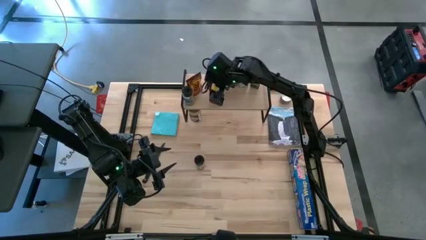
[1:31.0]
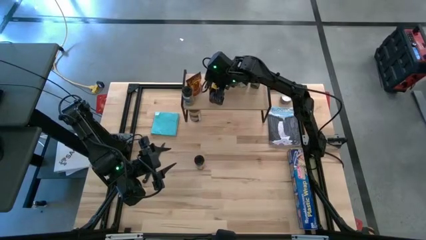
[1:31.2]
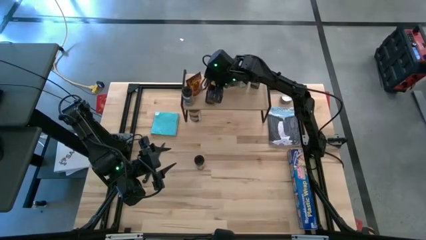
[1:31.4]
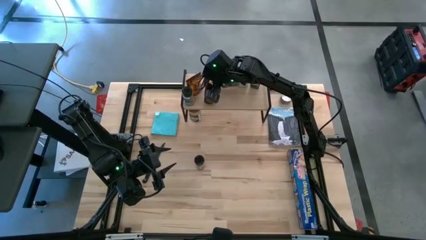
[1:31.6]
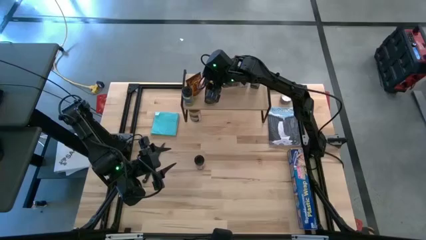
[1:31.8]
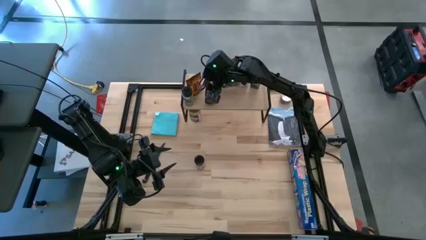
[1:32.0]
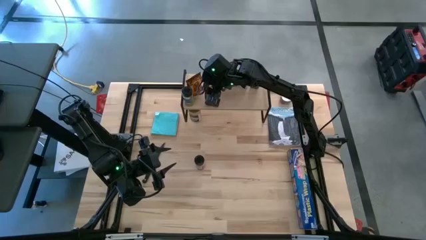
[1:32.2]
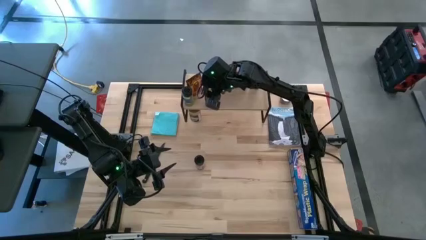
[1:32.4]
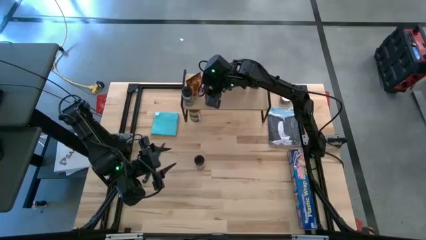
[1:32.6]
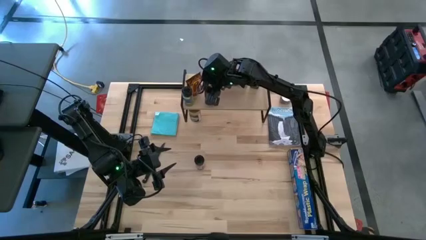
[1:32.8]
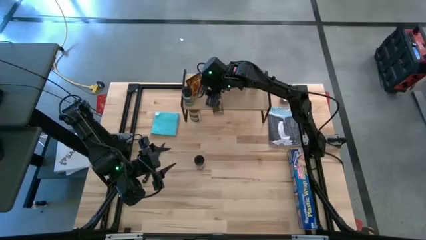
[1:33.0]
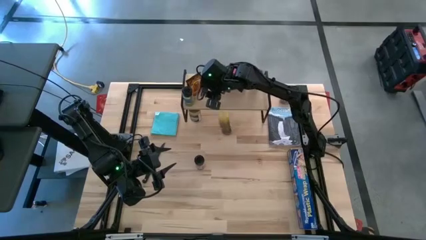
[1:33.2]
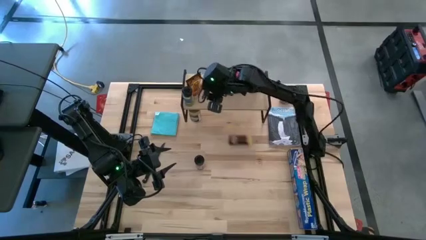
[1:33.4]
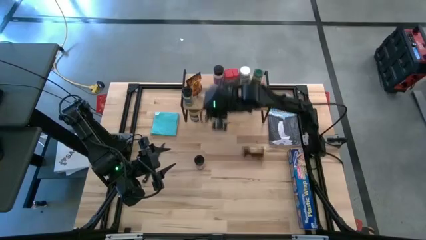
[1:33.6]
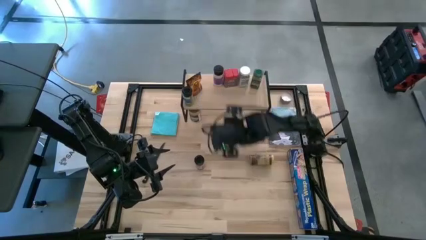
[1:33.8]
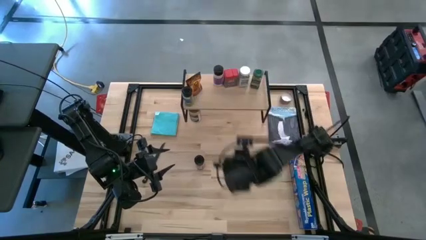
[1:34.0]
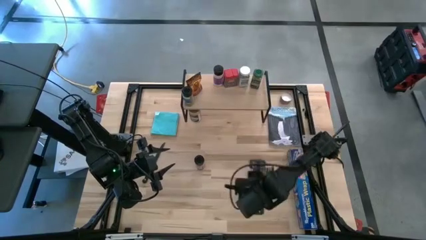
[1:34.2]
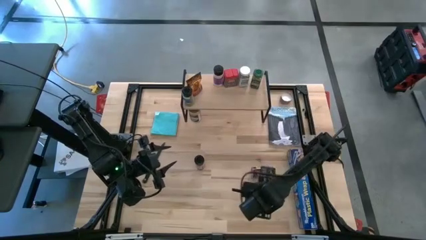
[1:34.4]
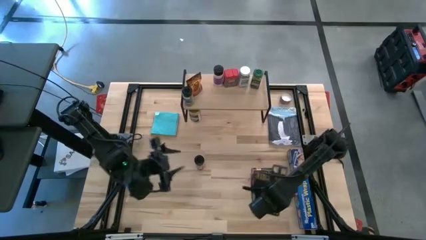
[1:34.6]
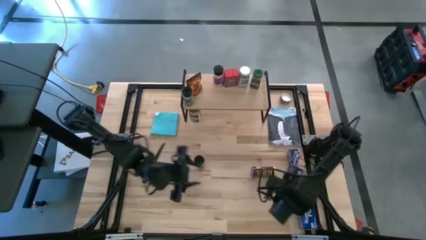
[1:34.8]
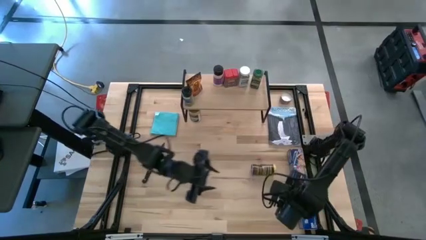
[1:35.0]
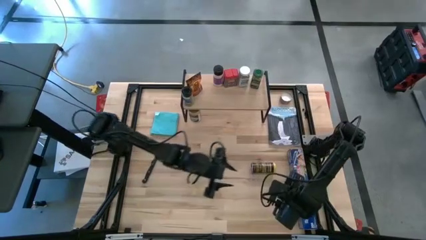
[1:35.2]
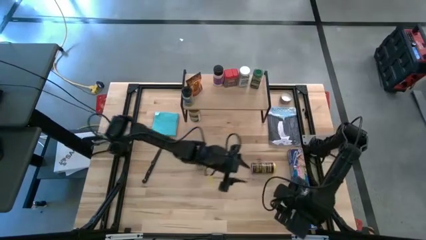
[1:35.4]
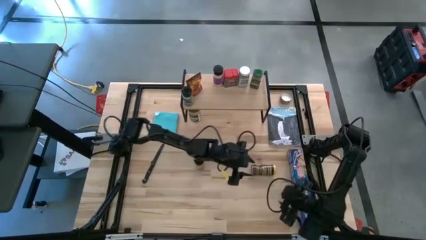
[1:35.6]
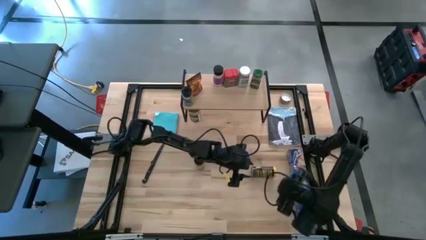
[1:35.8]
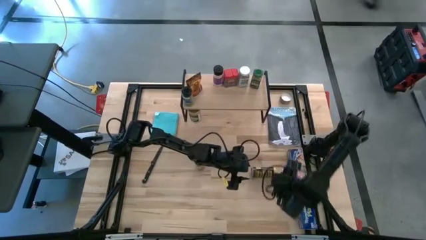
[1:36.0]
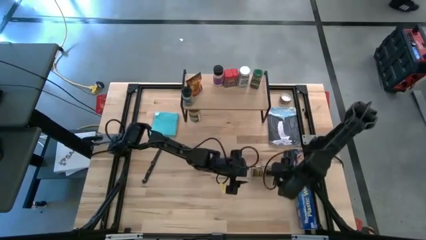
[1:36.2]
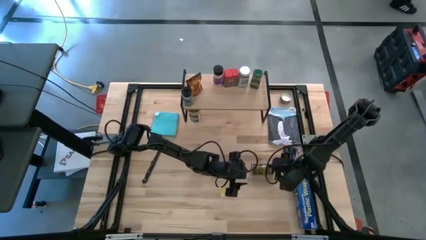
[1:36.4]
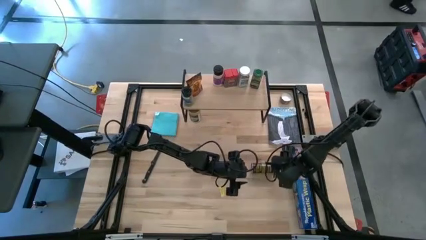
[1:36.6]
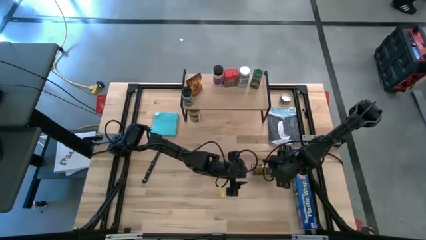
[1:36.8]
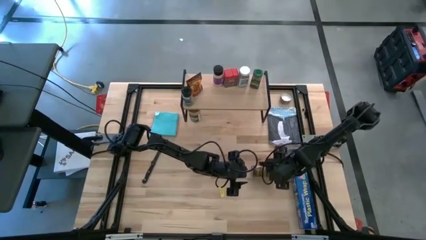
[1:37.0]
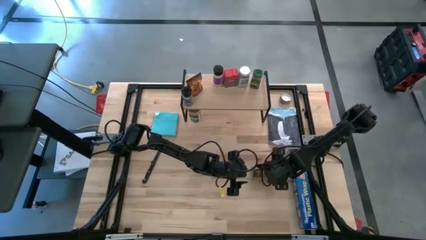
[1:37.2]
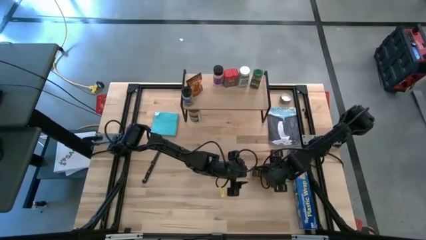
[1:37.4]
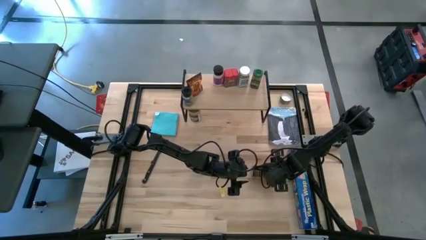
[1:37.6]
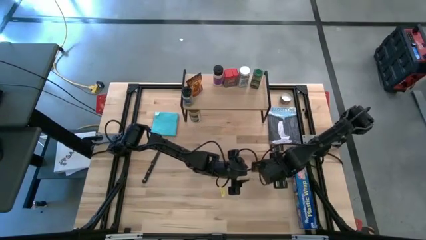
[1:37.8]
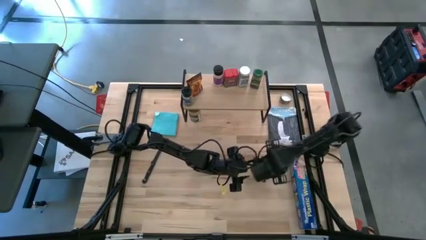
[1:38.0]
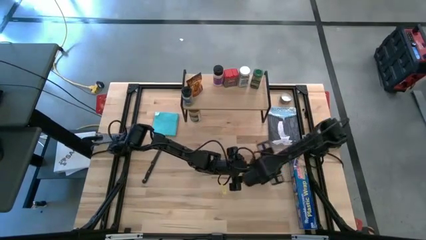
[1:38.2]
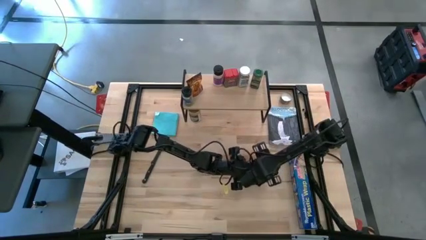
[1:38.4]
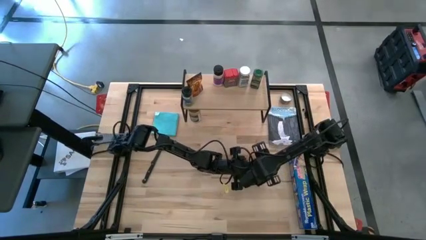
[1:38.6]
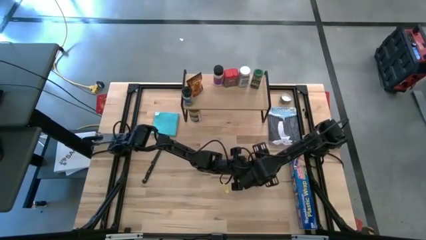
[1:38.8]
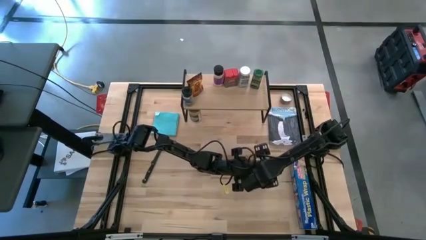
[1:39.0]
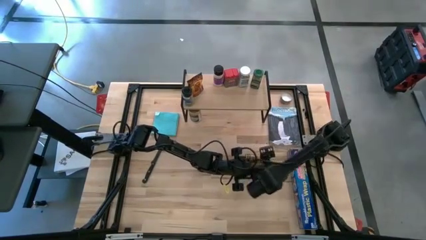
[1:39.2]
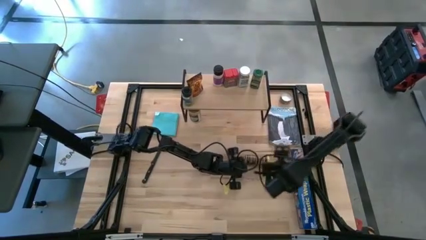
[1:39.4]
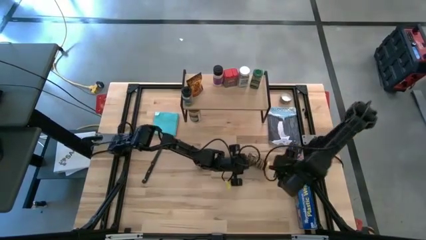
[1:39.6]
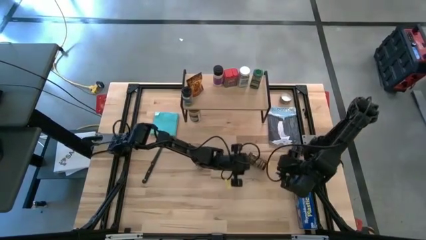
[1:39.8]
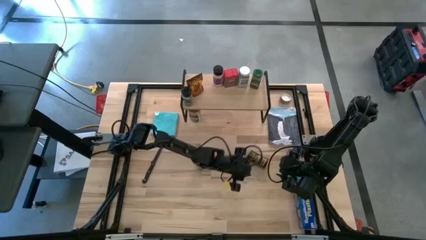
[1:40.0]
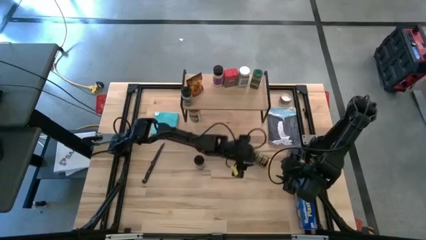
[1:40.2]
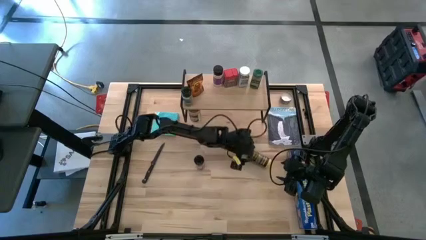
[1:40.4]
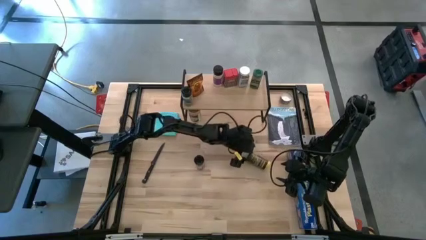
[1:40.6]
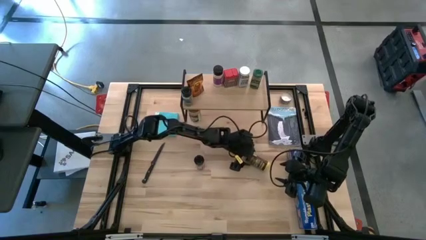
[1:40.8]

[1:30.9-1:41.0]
Task: Shelf spices
Put the yellow seasoning bottle on the shelf
